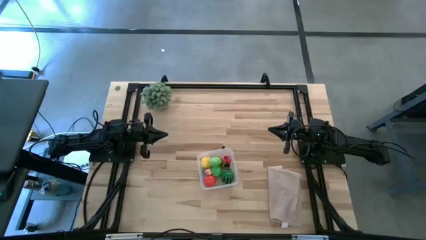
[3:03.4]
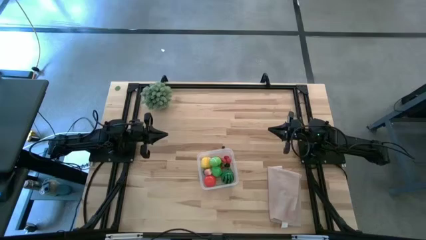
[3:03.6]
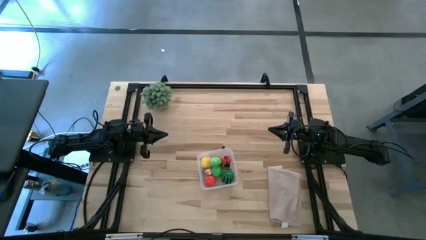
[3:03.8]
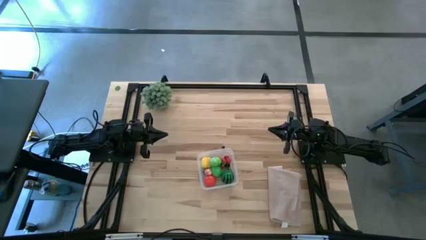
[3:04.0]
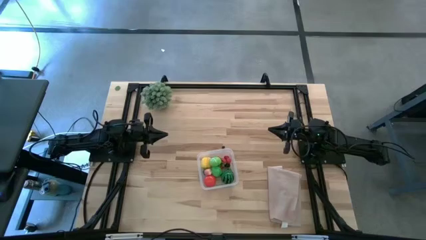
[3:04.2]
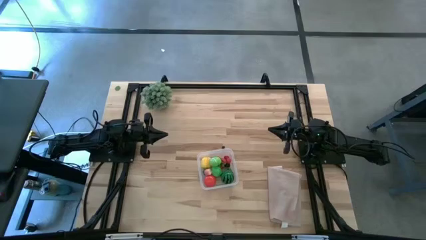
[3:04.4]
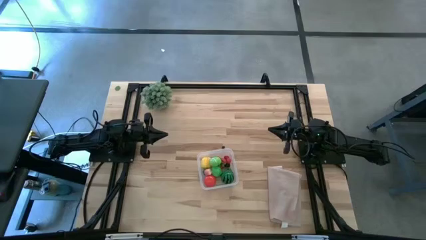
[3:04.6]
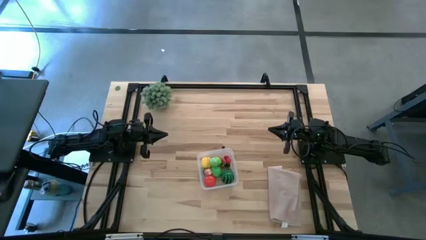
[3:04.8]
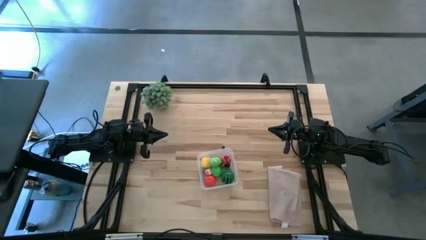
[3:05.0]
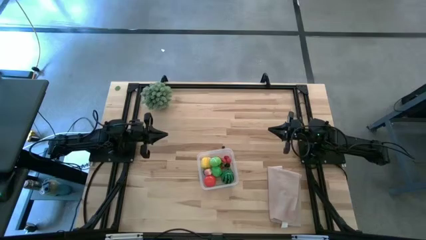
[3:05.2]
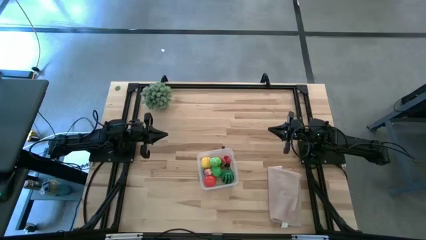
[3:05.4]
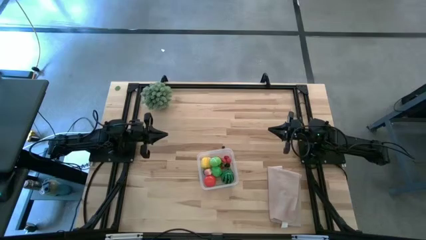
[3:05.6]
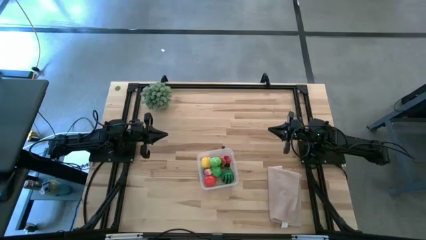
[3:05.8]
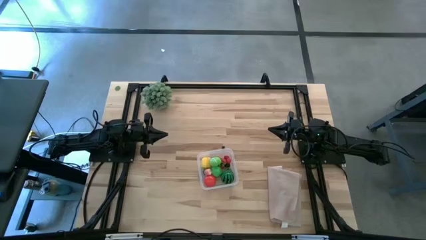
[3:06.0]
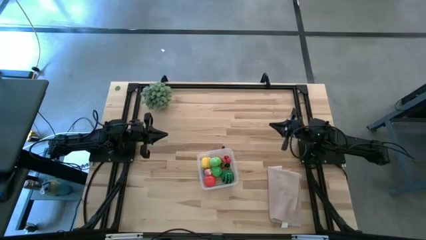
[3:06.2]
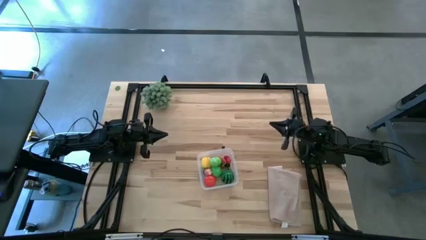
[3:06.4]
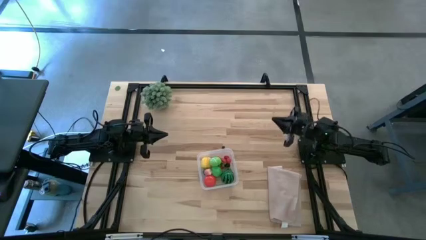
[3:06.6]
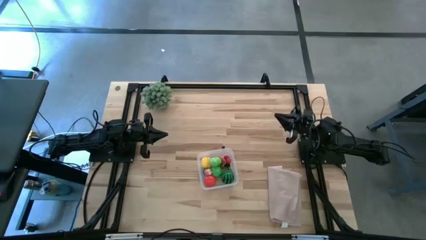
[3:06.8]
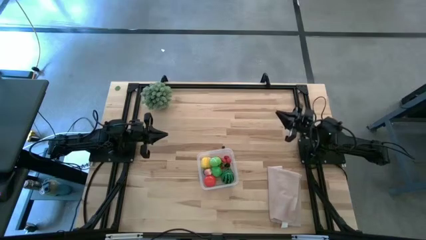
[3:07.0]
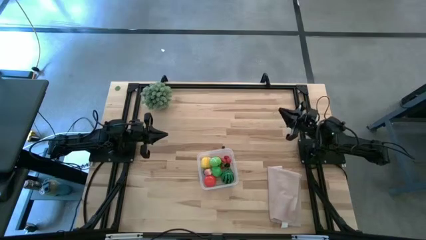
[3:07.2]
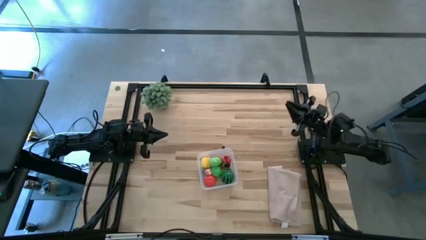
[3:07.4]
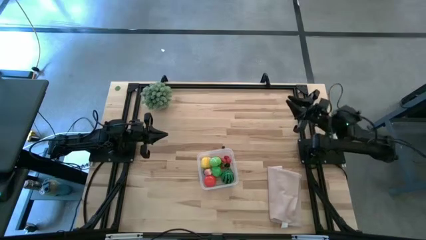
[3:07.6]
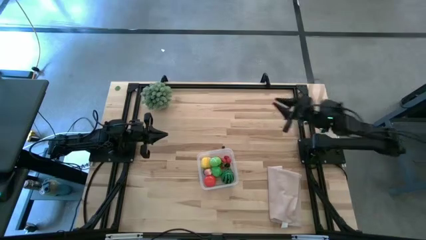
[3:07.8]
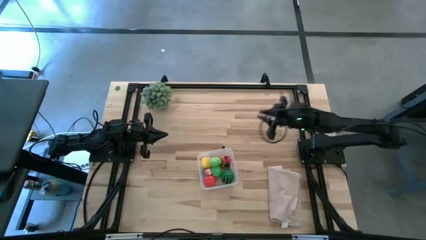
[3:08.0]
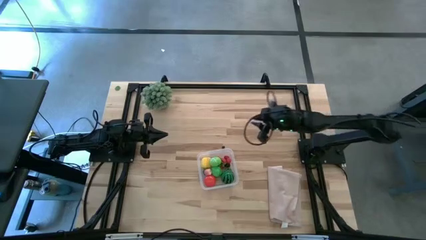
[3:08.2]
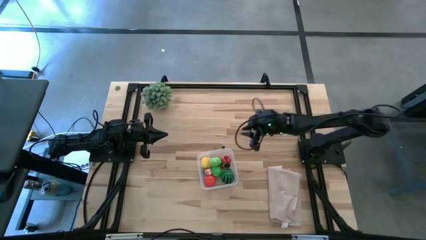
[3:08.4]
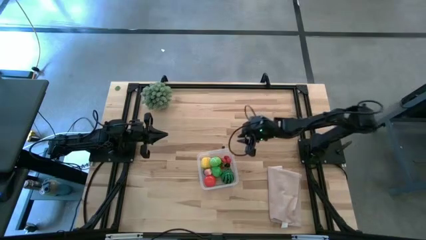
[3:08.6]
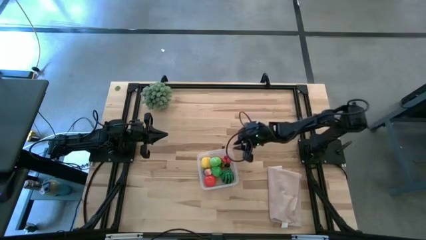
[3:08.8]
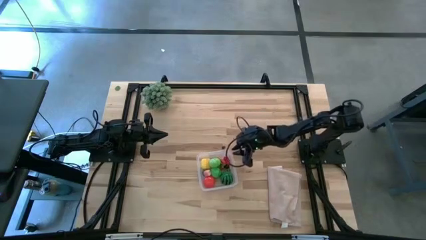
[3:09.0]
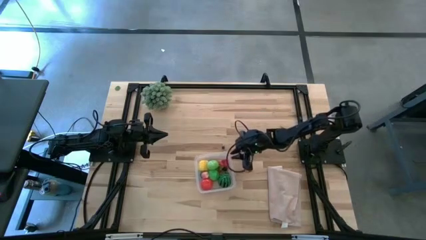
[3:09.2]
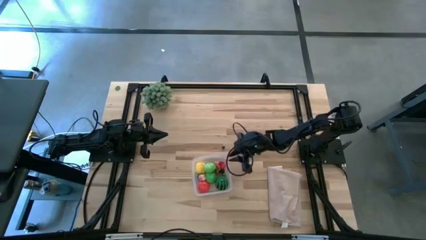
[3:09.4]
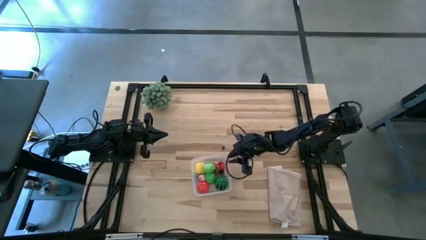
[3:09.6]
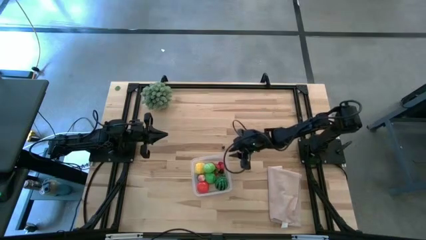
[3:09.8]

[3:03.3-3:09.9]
Task: Pick and placing Produce into tupperware
Adjust the transparent bin on the table

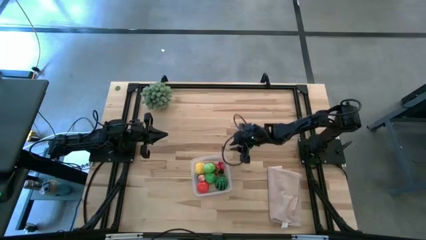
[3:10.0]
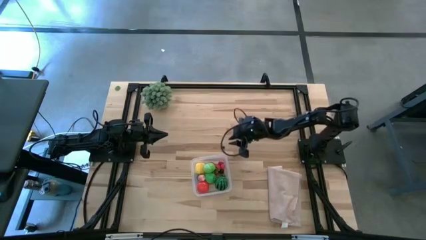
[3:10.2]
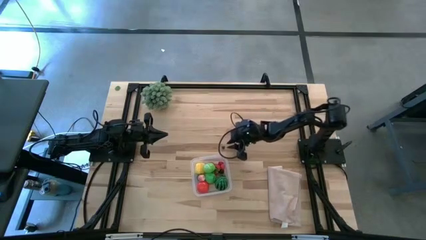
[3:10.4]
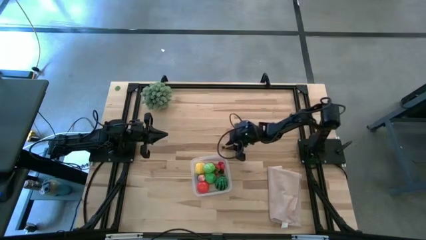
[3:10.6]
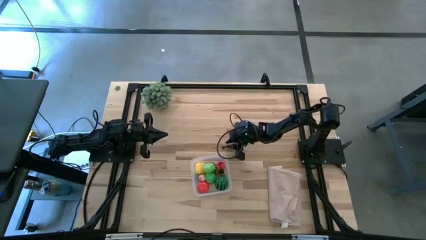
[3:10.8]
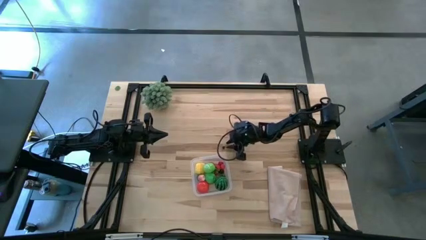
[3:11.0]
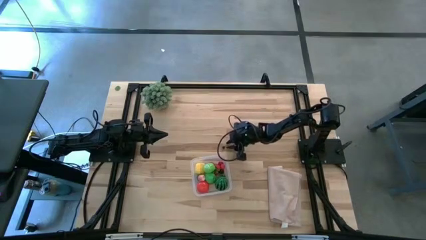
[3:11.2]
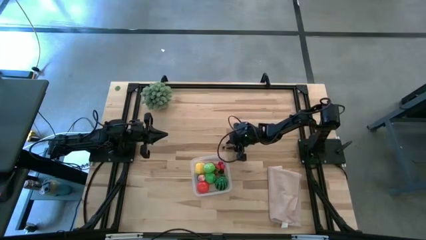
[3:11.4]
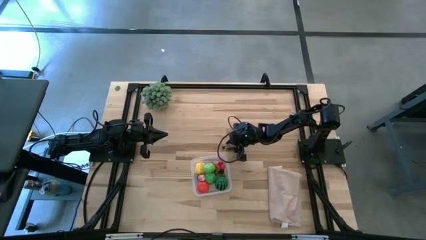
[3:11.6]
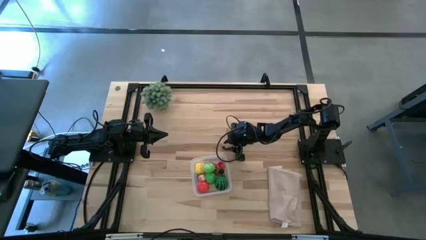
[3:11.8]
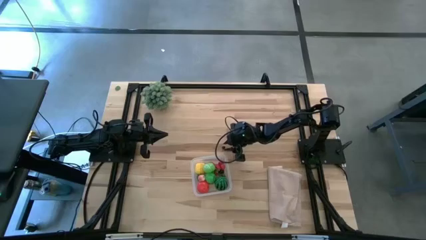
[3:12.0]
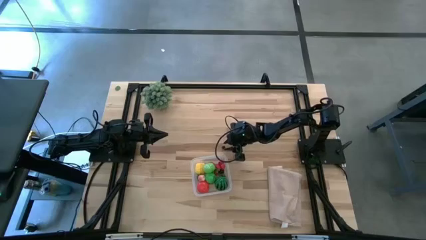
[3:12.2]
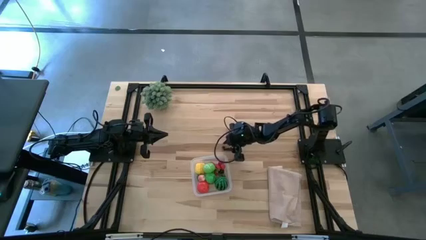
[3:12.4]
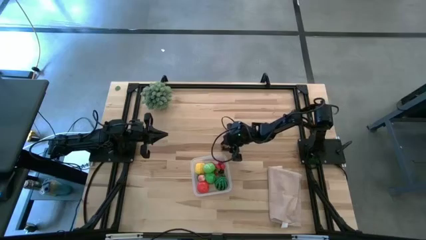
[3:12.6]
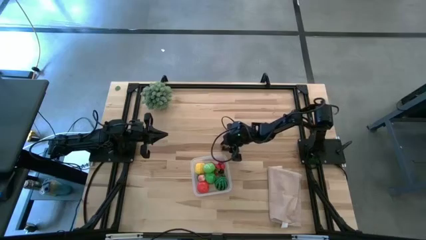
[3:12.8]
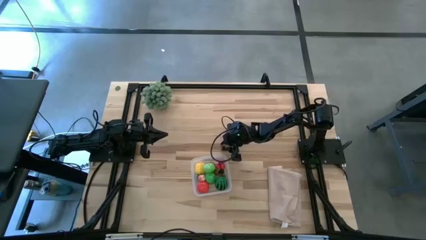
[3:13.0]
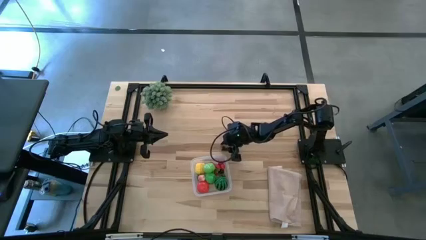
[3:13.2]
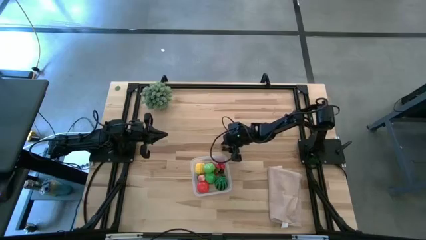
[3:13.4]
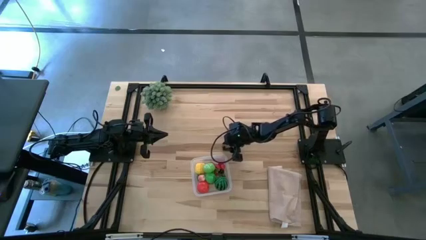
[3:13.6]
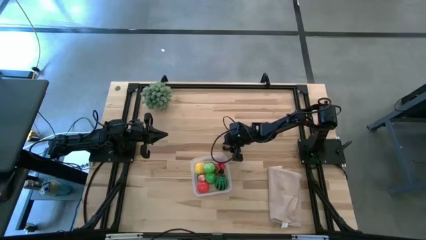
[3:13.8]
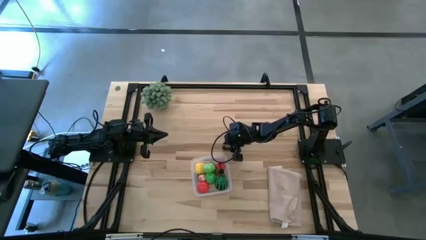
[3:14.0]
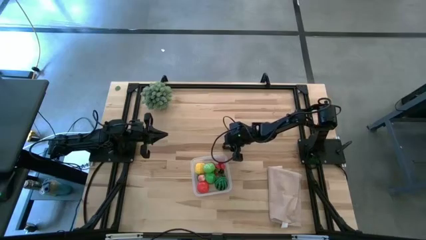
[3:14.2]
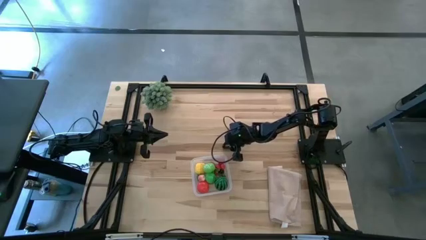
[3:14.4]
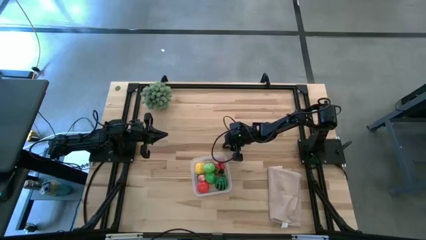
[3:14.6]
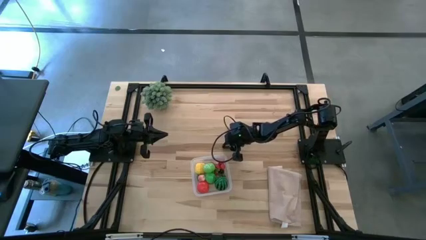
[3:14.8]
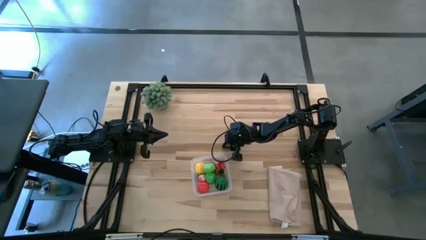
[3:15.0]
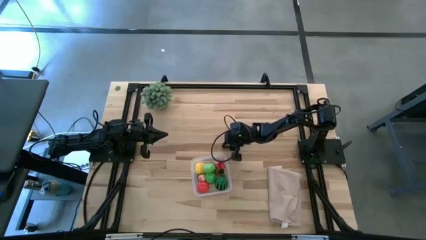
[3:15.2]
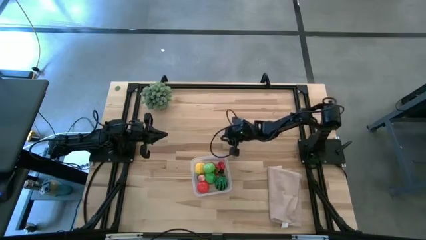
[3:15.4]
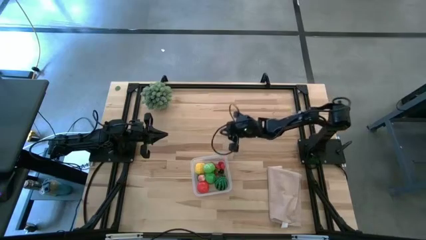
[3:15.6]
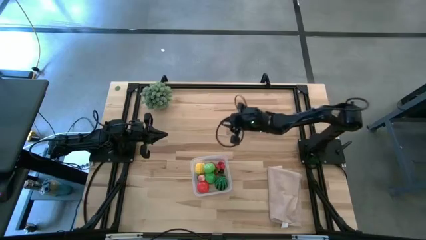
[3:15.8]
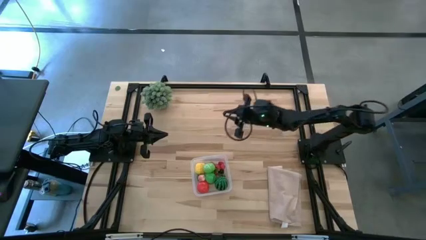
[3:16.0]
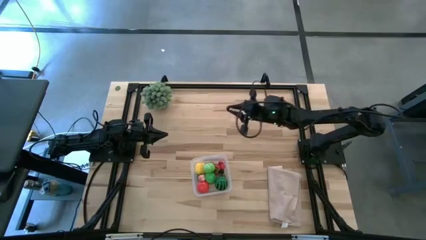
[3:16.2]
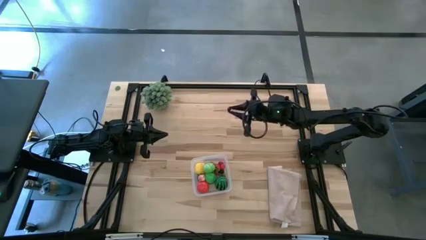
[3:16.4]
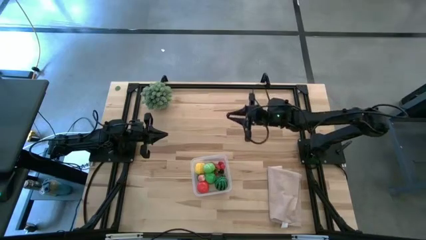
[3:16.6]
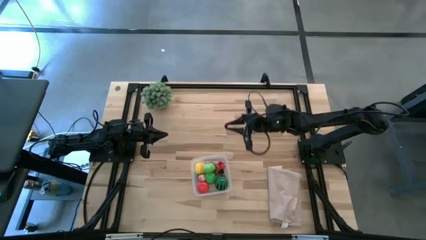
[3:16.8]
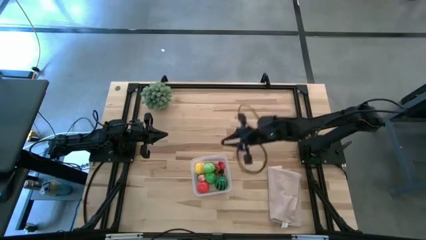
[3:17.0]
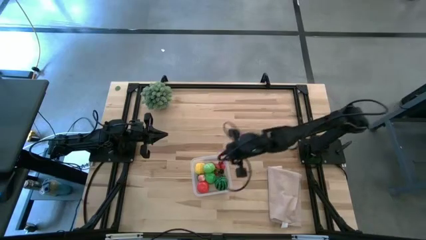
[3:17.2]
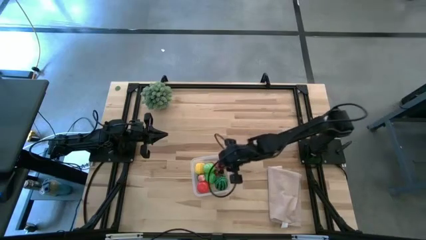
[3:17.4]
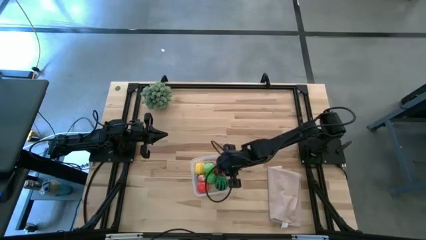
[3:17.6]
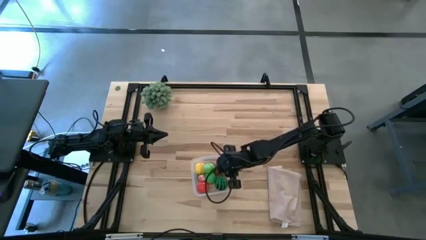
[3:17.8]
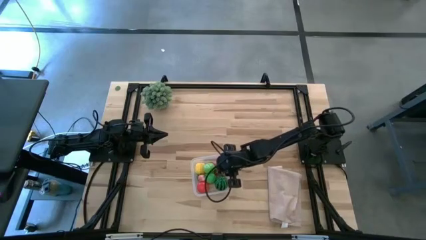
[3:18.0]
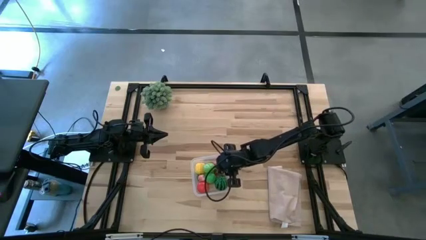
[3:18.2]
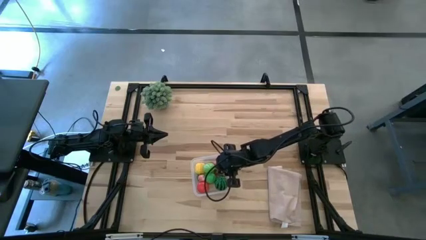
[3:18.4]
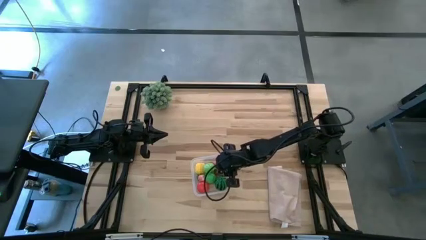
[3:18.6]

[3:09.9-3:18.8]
Put the blueberry into the transparent bin
